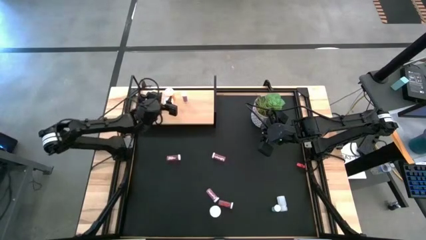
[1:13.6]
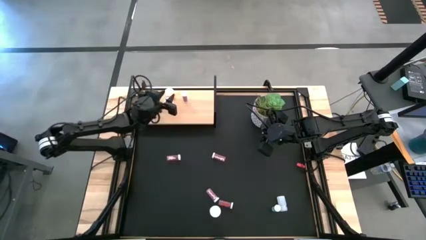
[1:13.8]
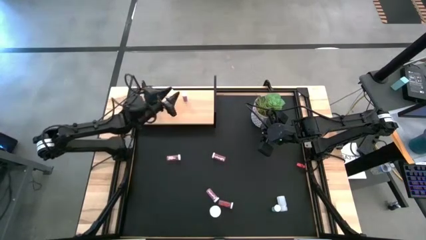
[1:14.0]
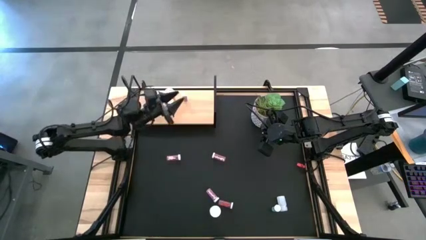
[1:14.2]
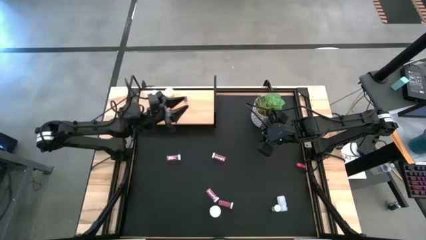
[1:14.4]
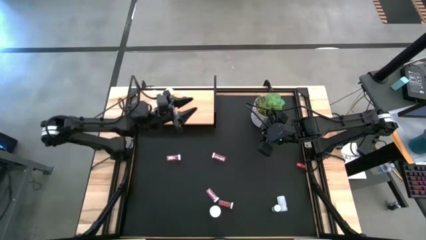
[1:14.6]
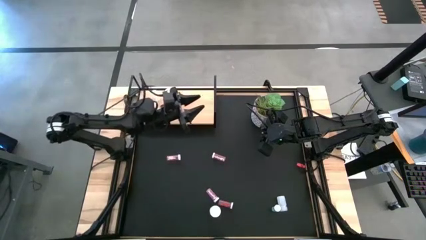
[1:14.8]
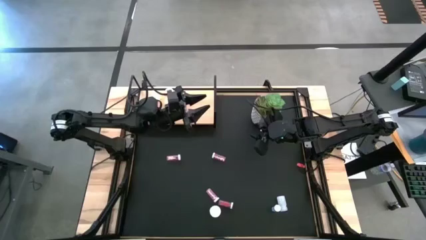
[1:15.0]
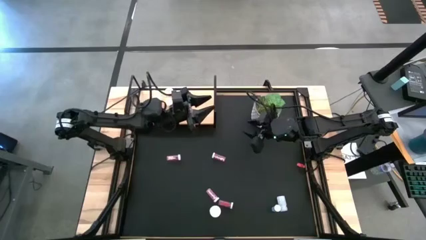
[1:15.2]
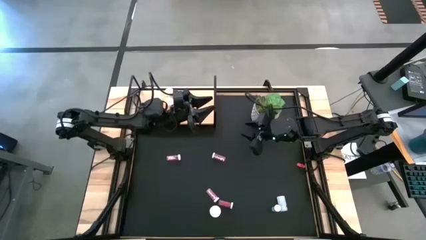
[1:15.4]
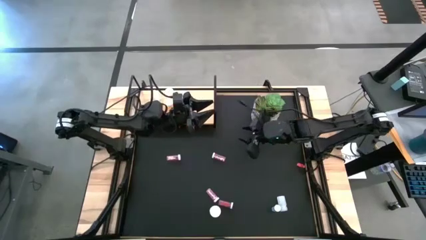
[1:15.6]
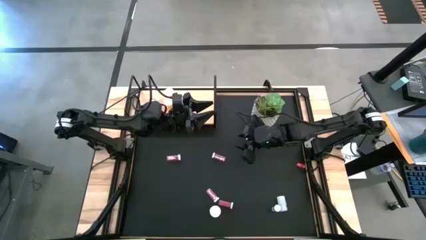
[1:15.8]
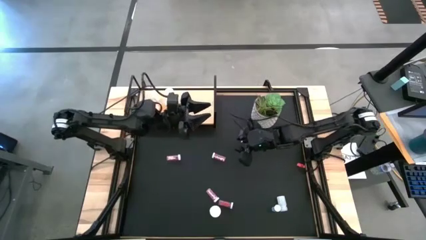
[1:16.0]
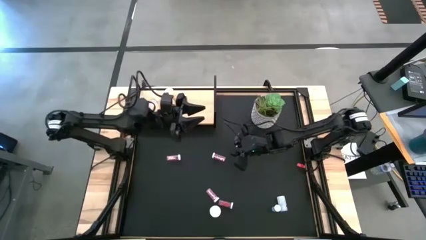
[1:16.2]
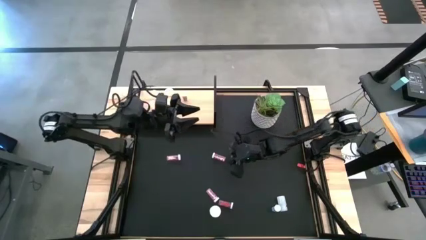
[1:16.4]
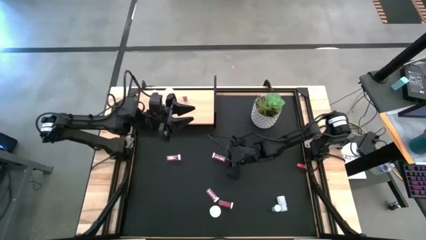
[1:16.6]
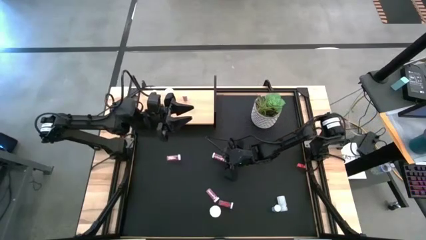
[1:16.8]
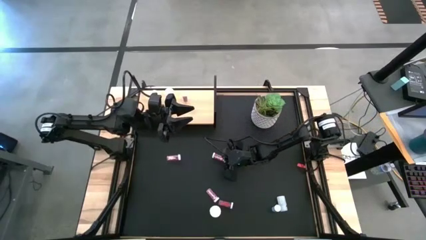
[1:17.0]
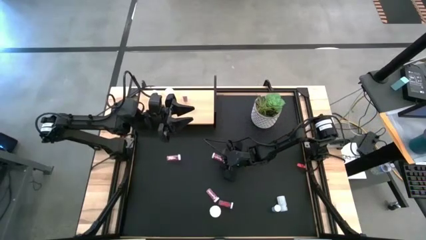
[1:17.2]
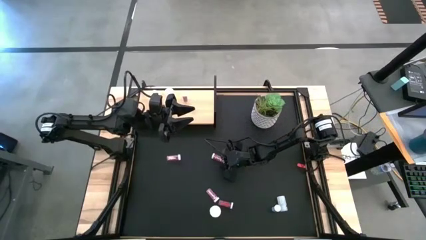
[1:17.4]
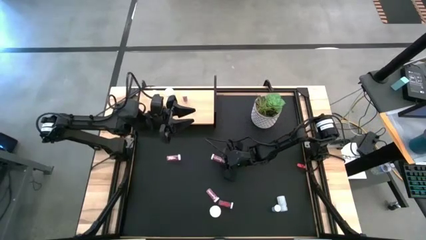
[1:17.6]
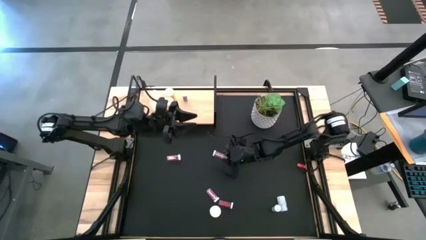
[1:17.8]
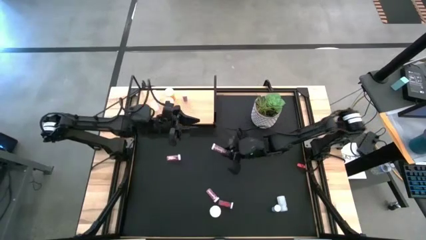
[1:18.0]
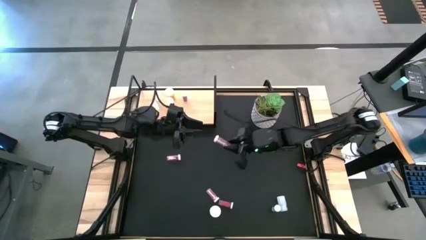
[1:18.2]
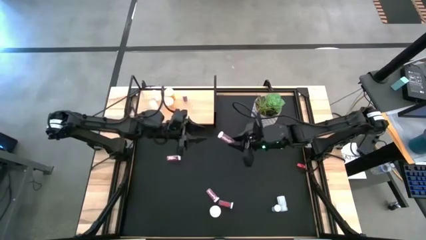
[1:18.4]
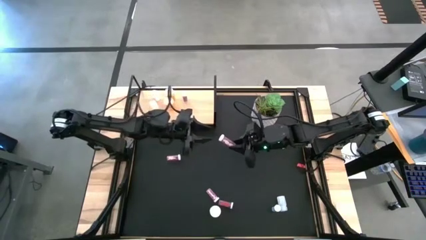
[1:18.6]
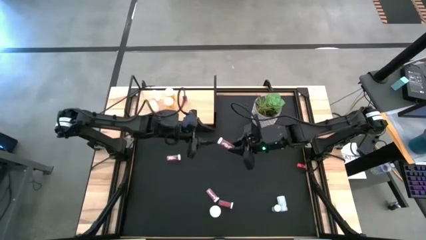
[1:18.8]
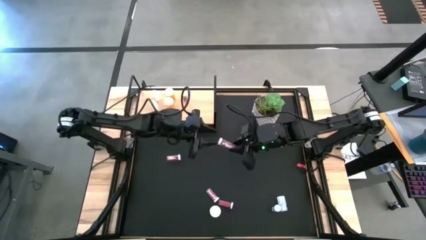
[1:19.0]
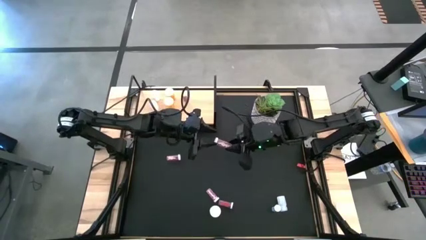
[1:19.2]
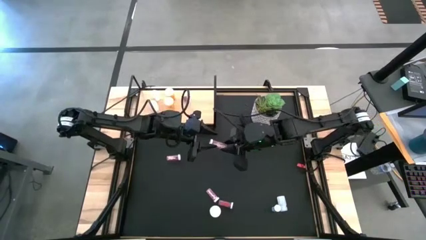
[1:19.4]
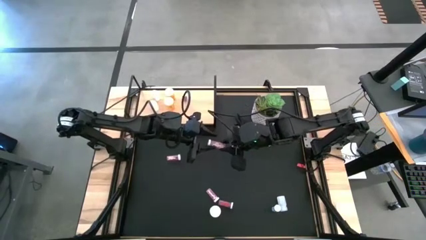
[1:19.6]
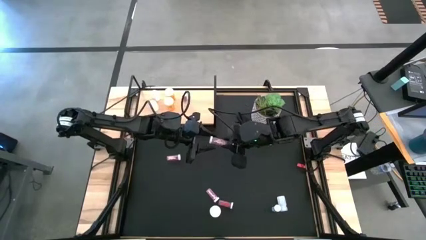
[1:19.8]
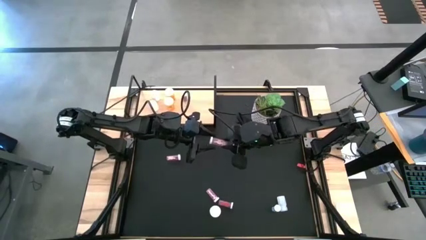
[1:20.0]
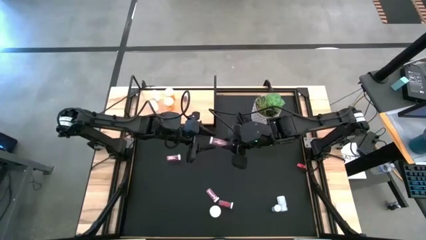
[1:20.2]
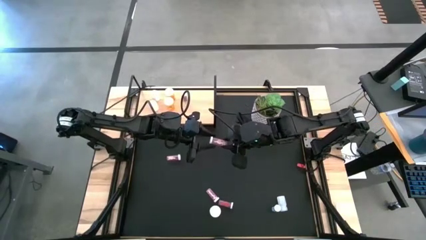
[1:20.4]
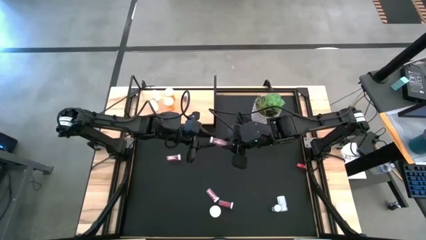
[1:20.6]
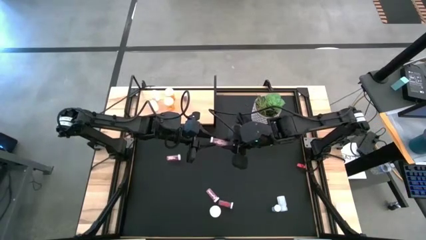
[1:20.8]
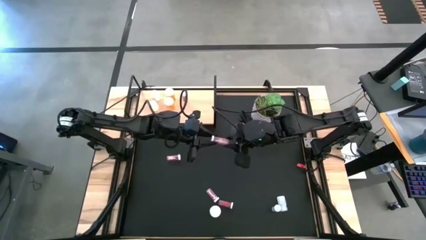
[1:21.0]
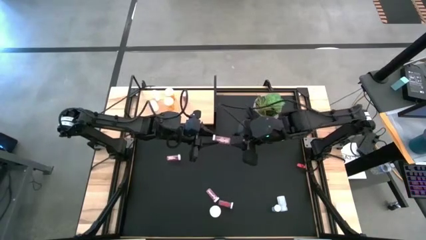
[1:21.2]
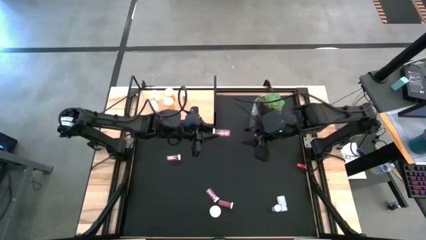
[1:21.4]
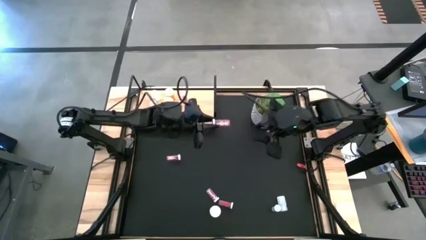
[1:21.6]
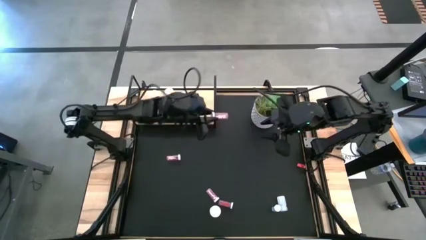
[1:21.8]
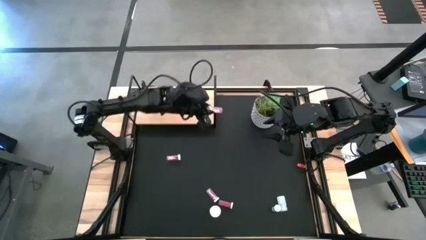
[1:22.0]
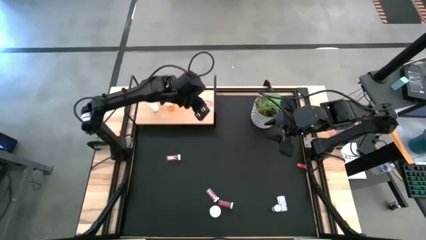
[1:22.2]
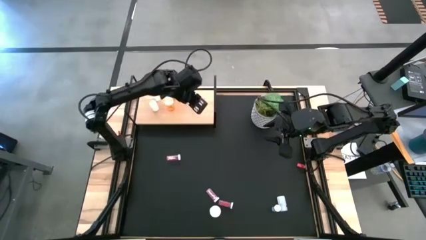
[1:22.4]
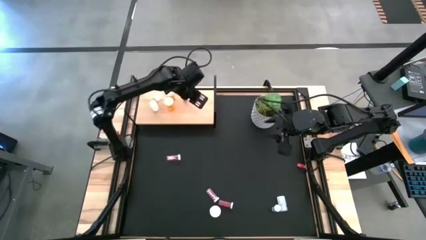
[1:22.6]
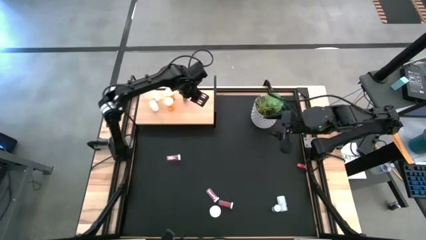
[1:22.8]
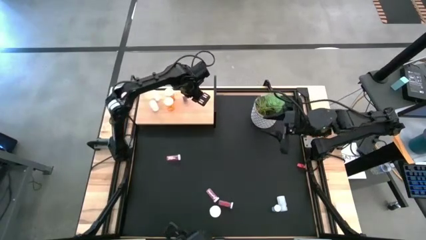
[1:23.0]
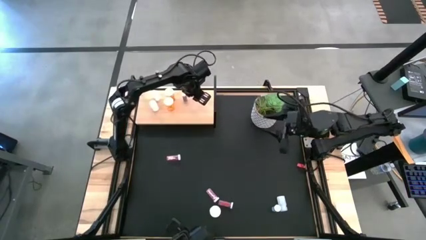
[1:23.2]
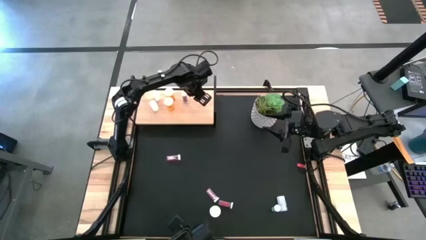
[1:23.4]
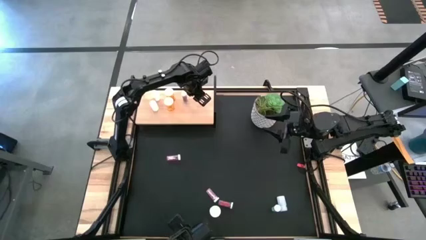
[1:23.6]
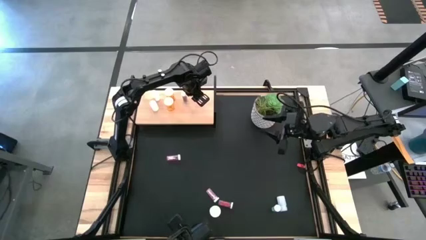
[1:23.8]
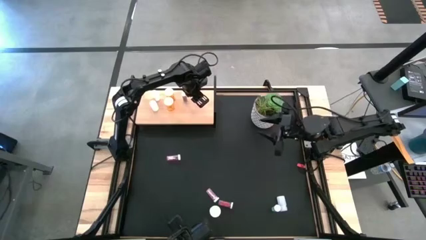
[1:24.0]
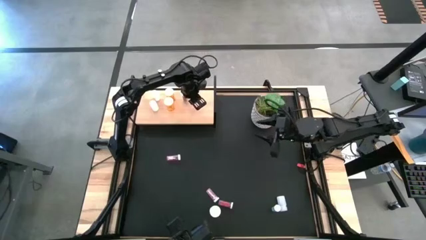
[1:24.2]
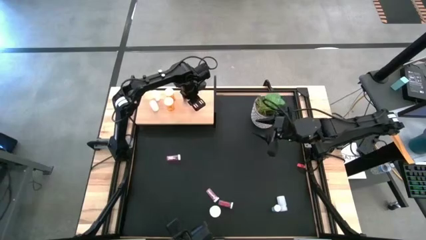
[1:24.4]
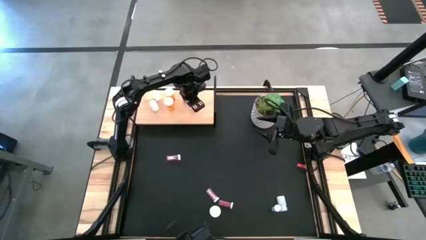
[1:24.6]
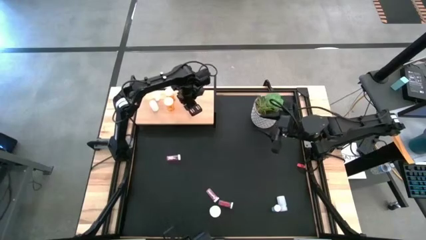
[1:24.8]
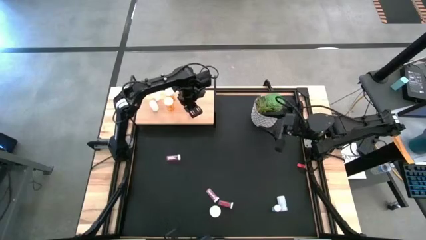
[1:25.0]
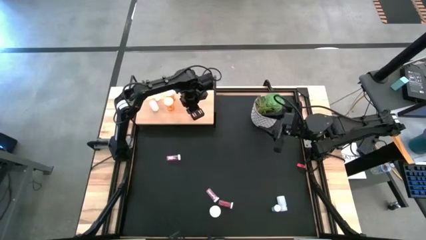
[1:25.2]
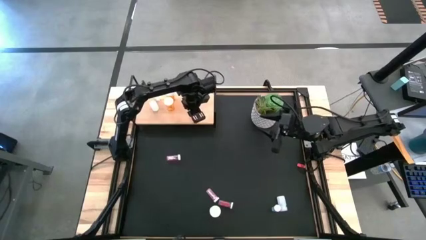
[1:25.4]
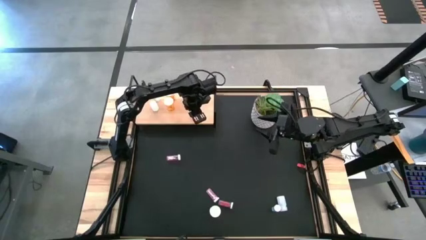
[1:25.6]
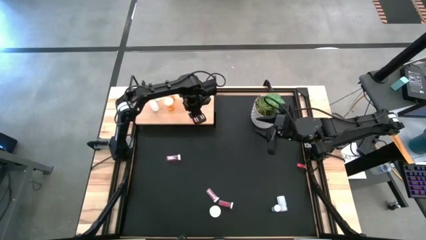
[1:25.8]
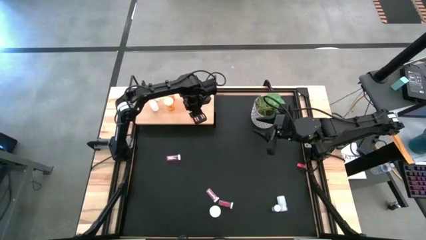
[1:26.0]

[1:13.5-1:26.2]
Task: Pick and place medicine bottles onto shelf by color
Put the top right pink pill bottle on the shelf

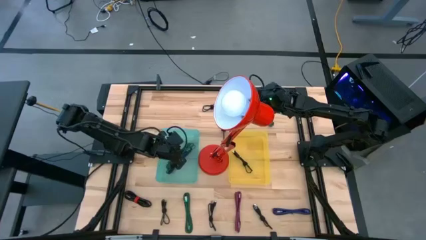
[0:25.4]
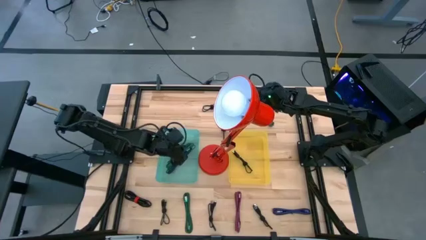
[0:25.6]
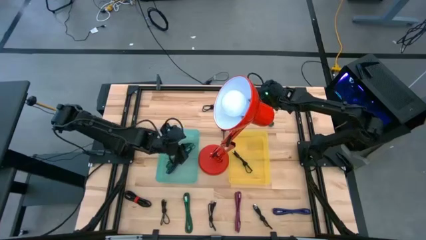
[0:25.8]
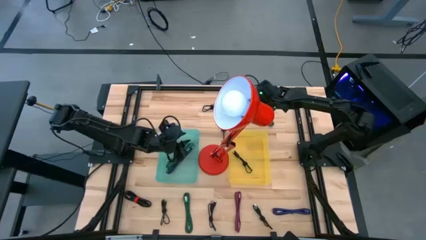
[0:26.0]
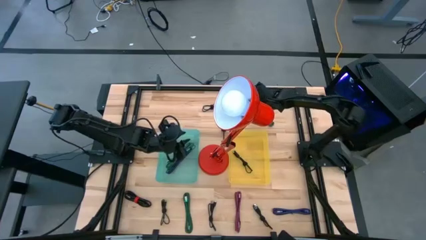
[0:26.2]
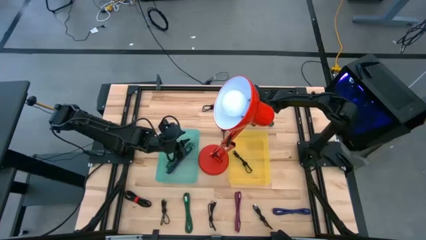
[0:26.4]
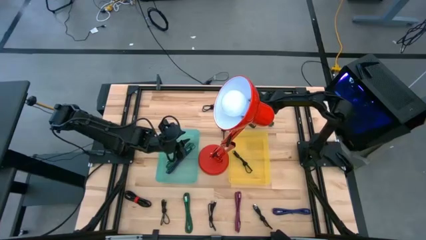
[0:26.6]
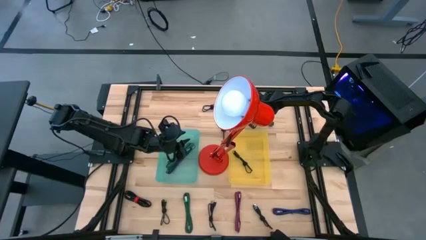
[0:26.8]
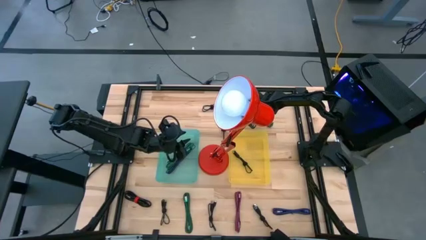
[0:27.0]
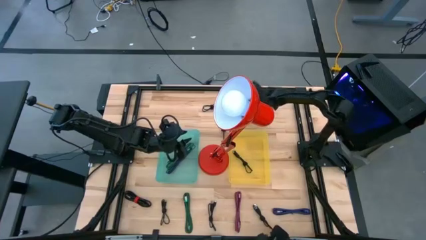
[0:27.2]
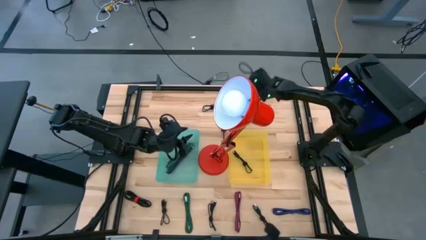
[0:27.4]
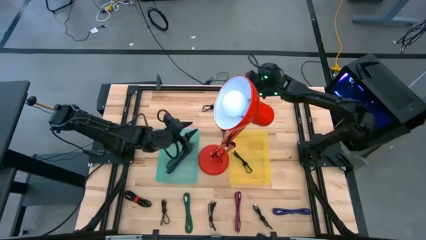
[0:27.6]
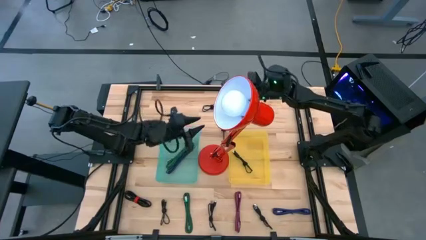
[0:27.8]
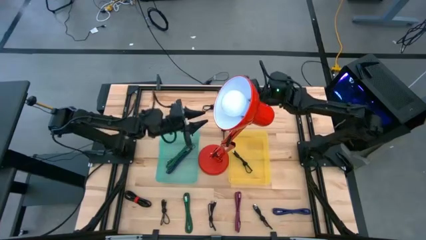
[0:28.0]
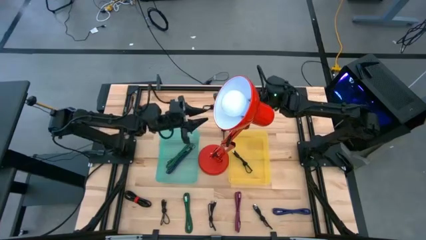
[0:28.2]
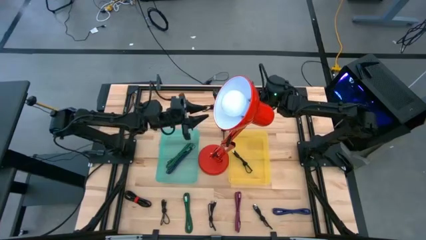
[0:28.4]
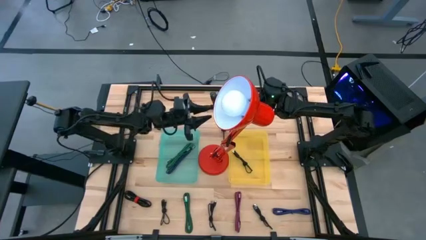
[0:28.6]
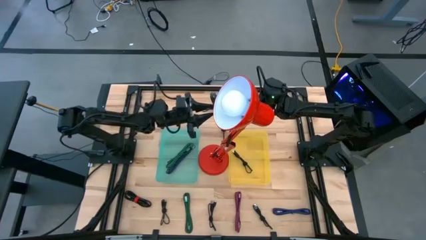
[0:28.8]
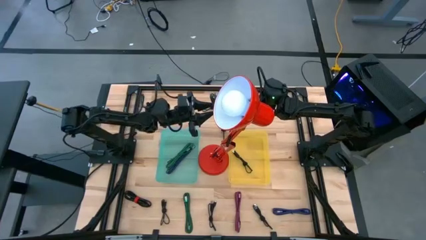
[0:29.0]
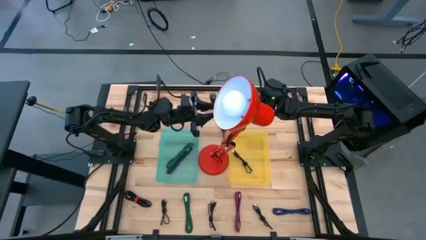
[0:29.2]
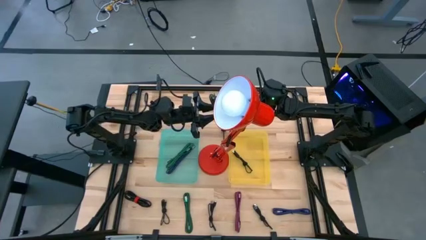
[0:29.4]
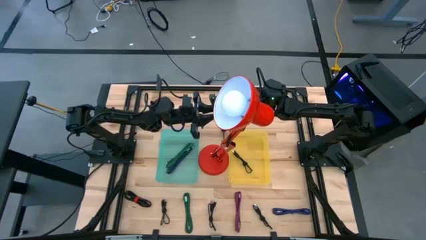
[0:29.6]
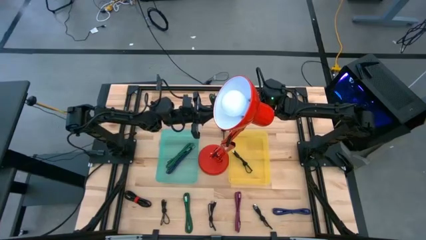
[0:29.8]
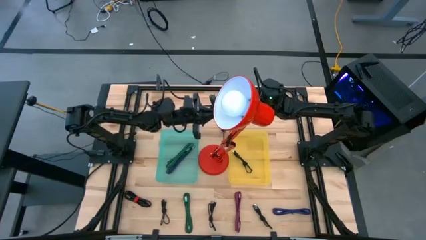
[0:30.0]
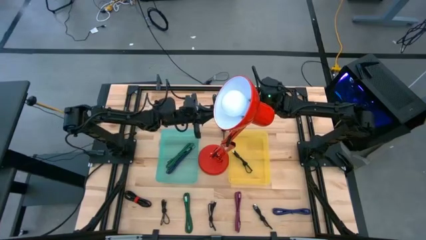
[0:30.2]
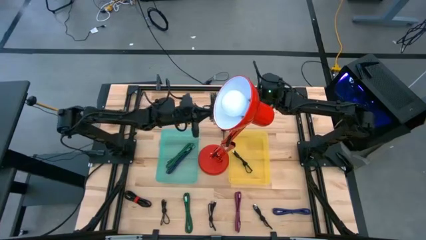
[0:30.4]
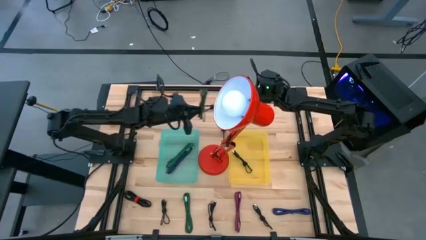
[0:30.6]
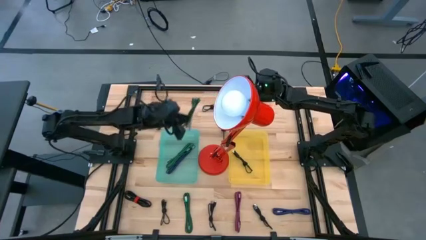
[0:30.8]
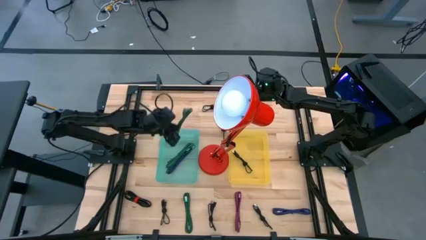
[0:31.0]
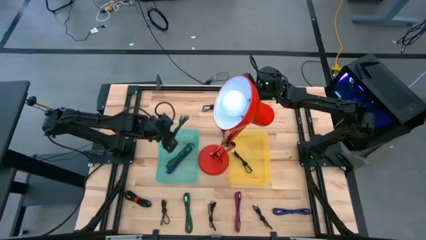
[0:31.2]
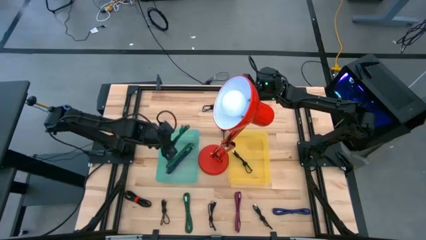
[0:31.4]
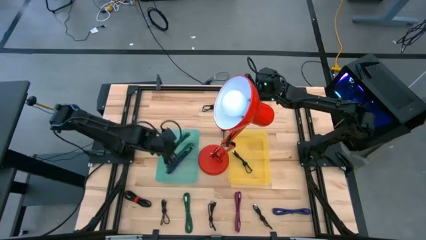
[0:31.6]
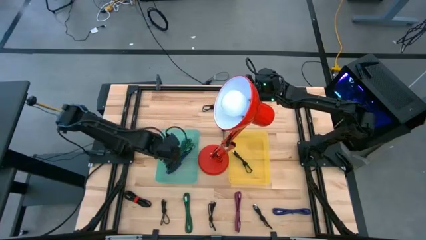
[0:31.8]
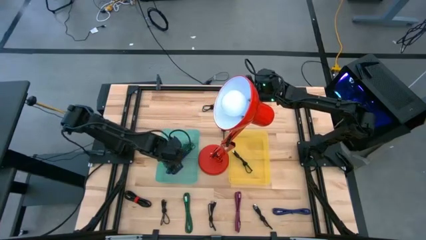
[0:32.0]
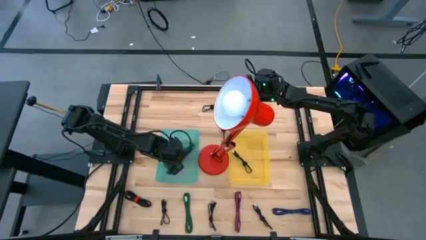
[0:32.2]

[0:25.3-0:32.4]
Task: Pick & Place USB Port
Put the top green patterned charger cable into the blue bin
